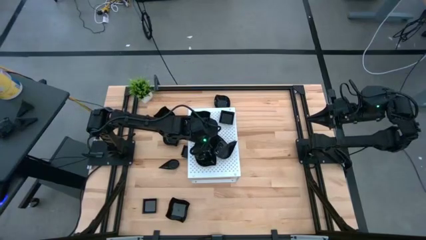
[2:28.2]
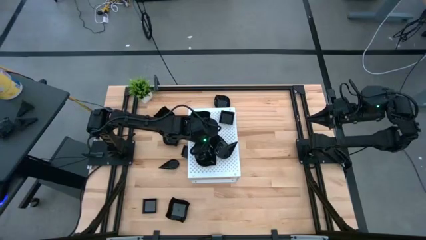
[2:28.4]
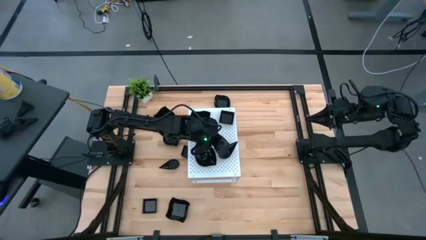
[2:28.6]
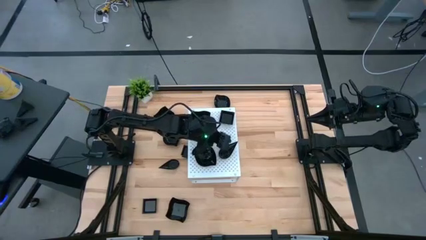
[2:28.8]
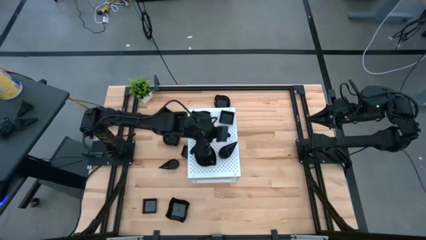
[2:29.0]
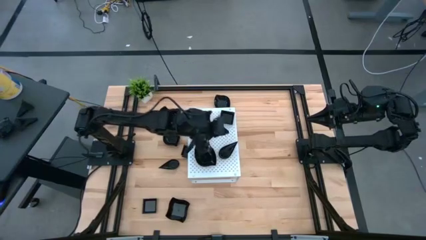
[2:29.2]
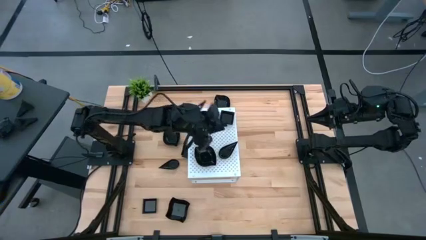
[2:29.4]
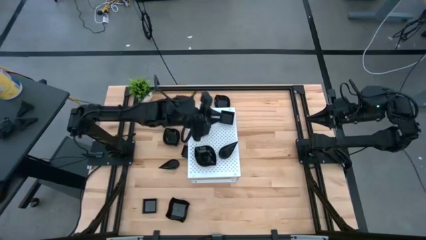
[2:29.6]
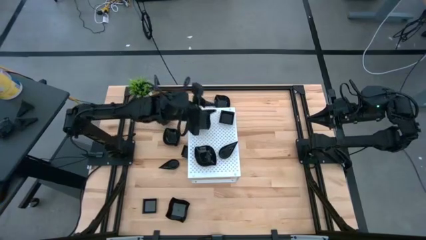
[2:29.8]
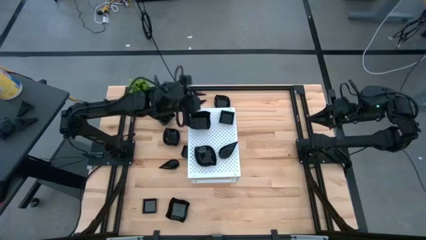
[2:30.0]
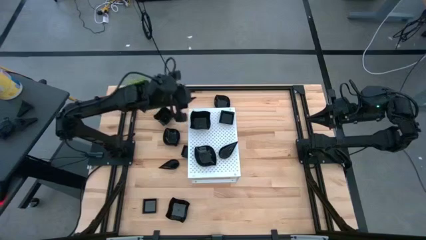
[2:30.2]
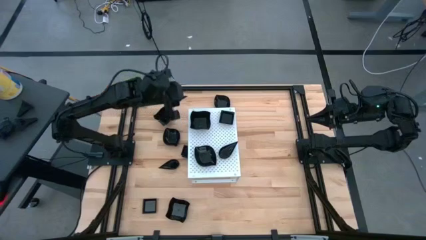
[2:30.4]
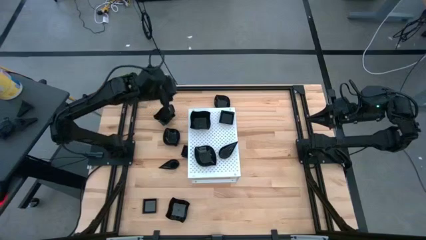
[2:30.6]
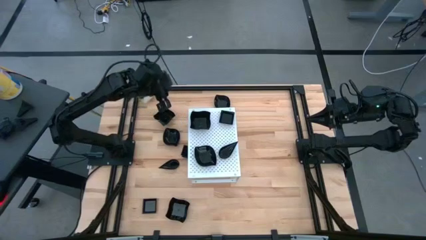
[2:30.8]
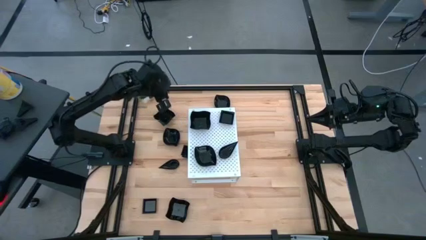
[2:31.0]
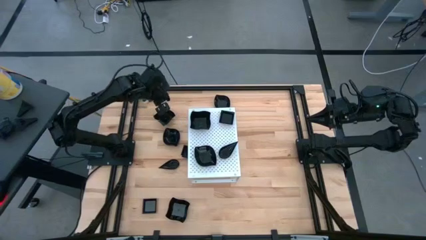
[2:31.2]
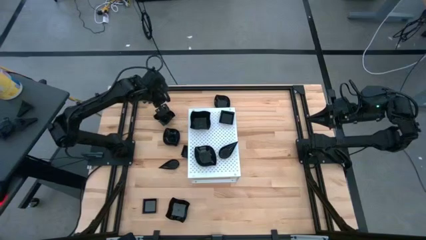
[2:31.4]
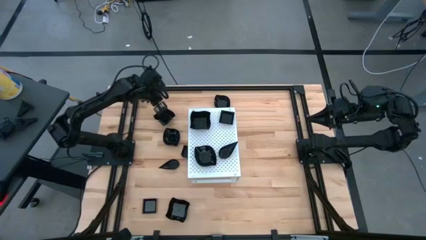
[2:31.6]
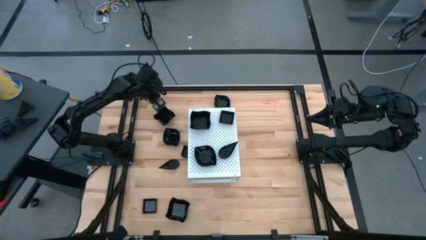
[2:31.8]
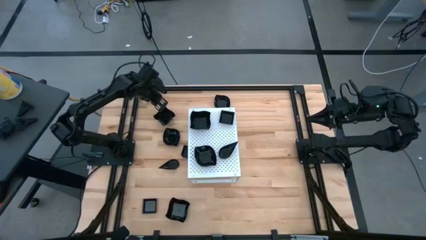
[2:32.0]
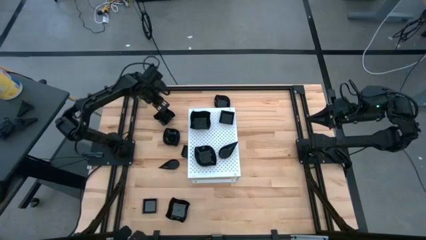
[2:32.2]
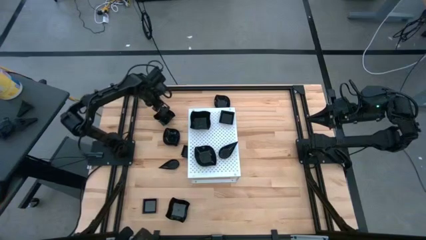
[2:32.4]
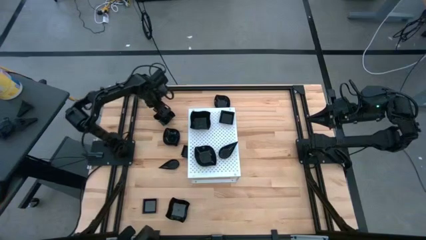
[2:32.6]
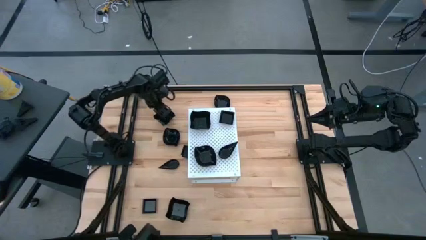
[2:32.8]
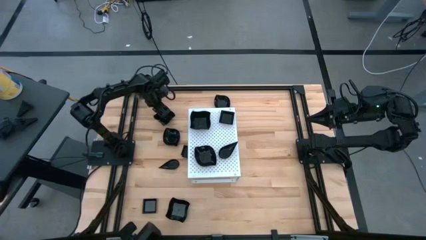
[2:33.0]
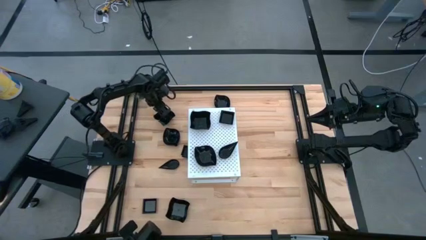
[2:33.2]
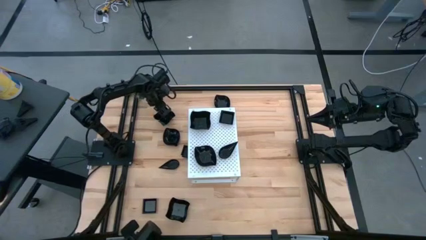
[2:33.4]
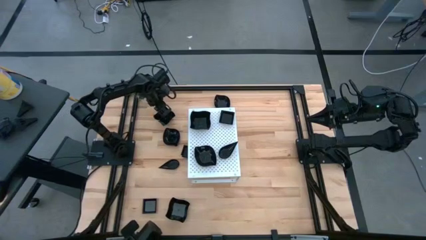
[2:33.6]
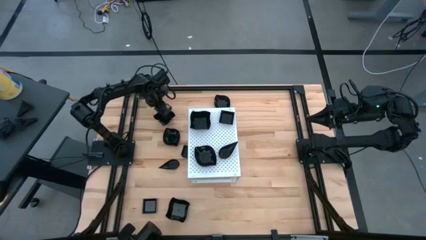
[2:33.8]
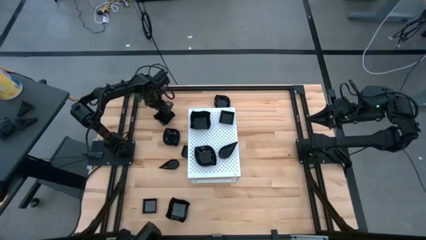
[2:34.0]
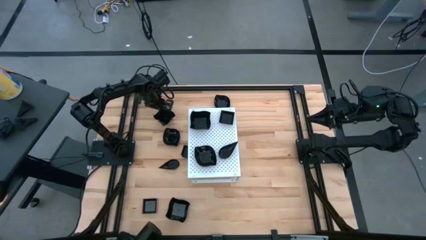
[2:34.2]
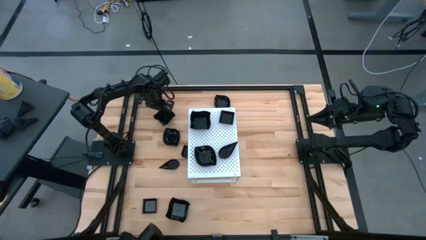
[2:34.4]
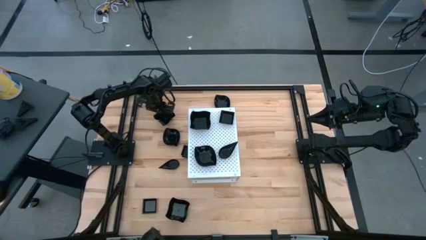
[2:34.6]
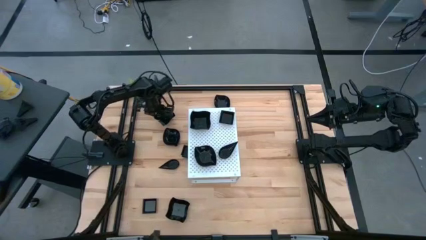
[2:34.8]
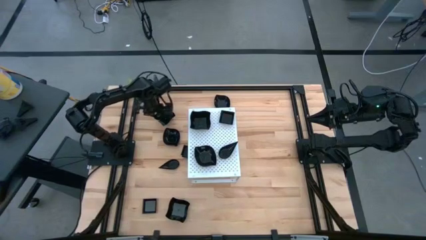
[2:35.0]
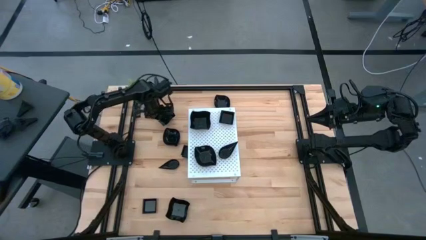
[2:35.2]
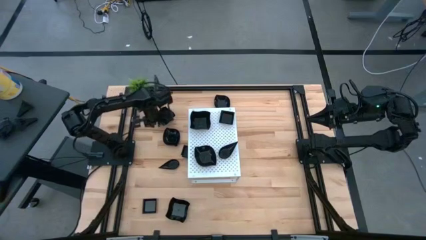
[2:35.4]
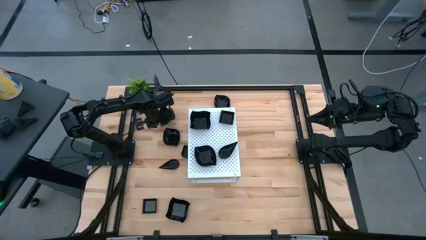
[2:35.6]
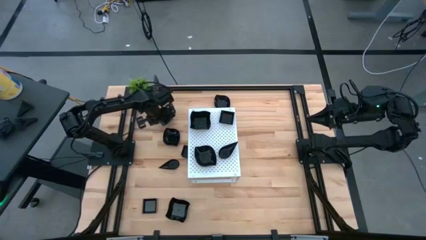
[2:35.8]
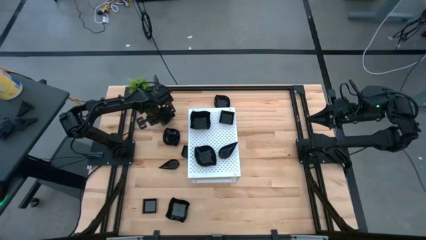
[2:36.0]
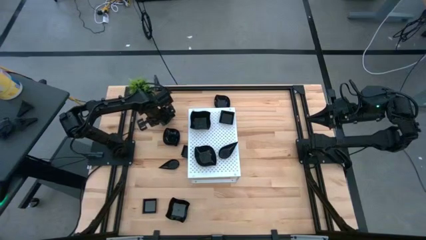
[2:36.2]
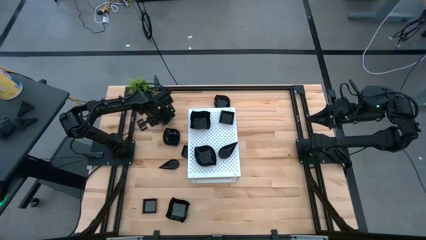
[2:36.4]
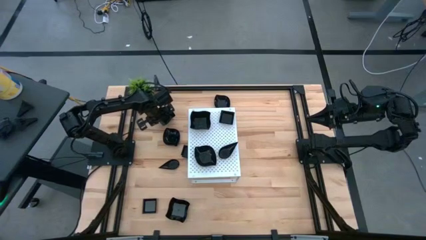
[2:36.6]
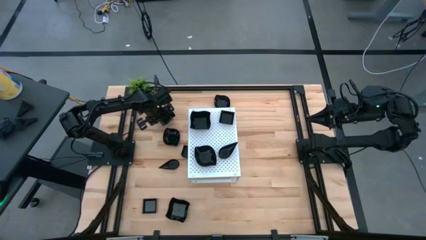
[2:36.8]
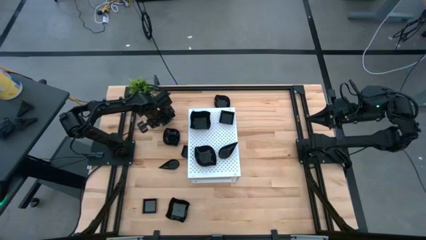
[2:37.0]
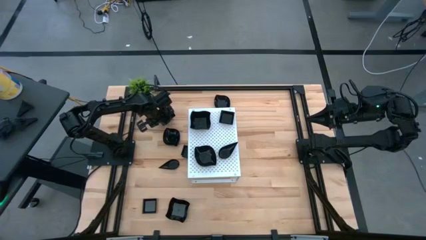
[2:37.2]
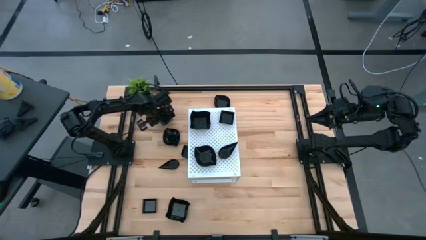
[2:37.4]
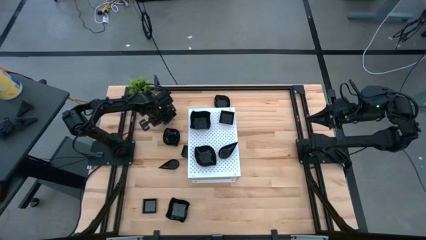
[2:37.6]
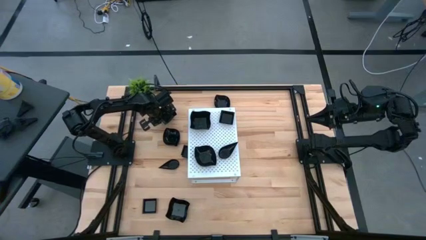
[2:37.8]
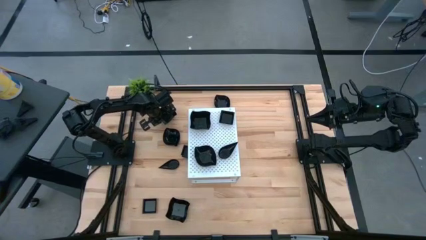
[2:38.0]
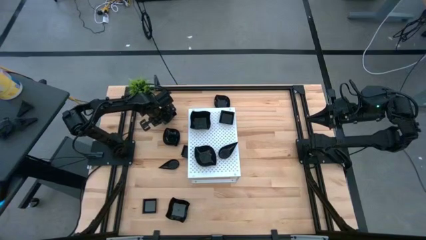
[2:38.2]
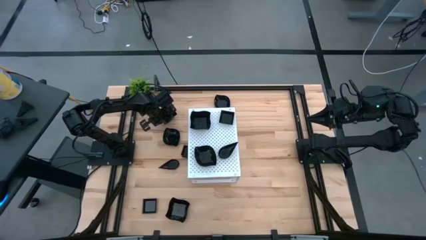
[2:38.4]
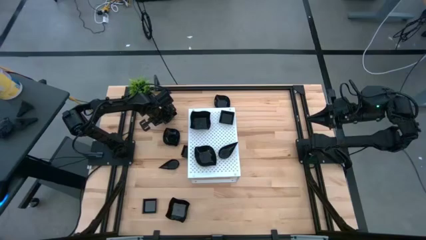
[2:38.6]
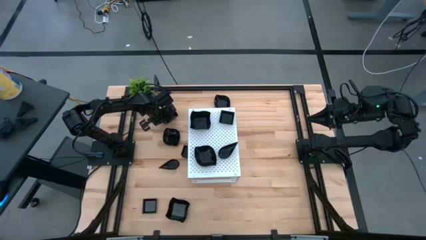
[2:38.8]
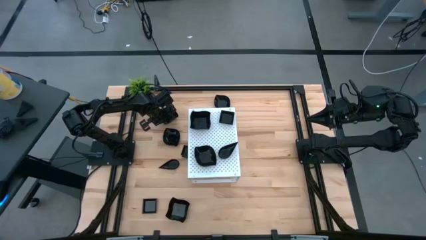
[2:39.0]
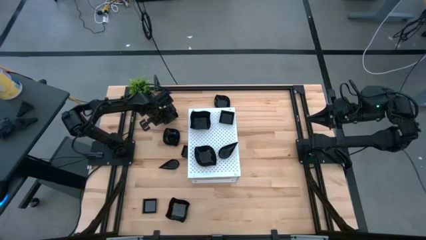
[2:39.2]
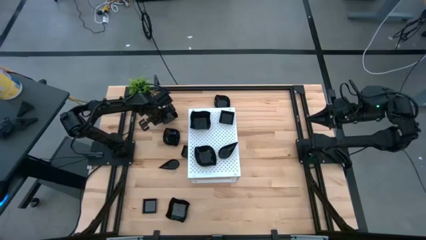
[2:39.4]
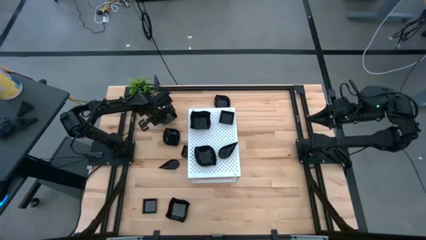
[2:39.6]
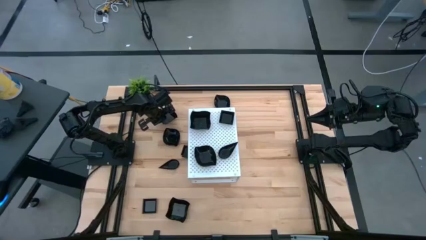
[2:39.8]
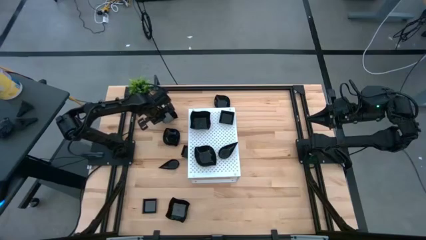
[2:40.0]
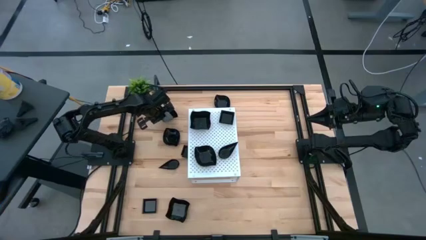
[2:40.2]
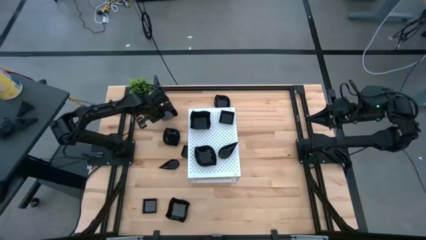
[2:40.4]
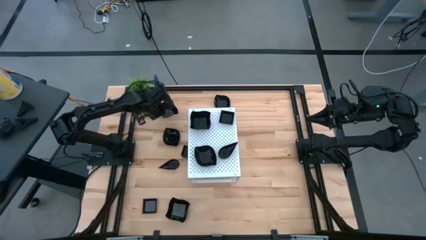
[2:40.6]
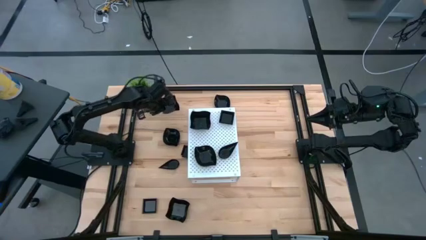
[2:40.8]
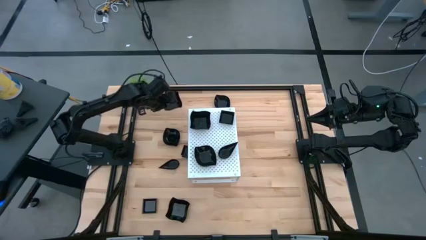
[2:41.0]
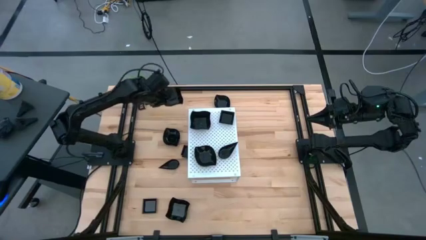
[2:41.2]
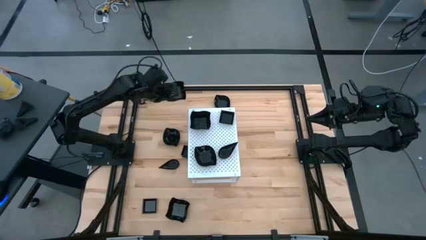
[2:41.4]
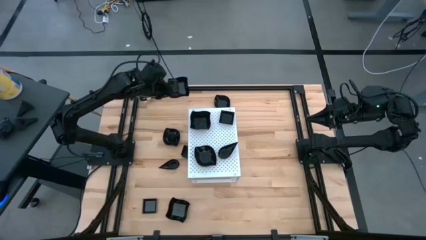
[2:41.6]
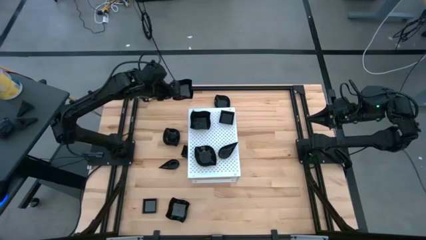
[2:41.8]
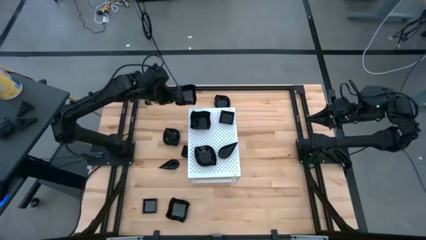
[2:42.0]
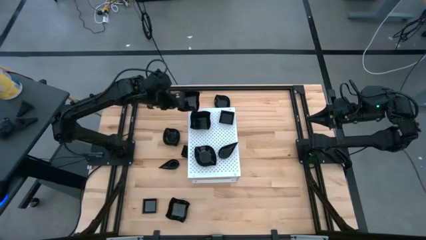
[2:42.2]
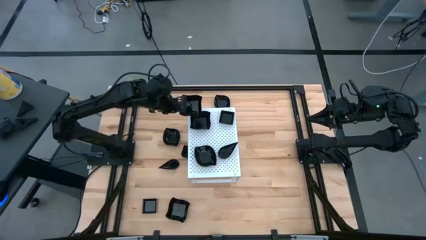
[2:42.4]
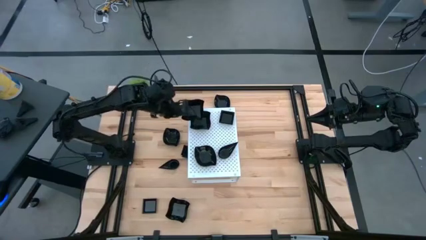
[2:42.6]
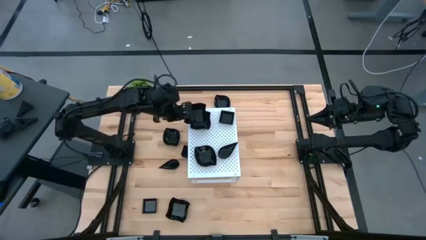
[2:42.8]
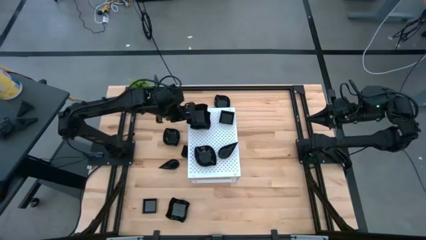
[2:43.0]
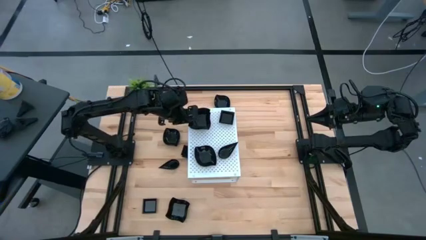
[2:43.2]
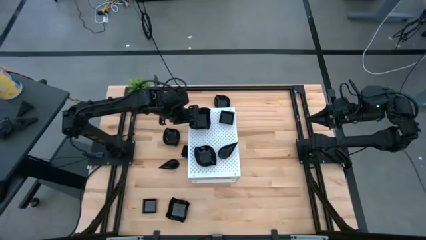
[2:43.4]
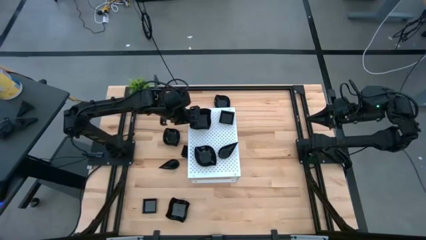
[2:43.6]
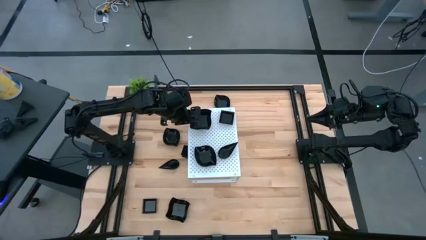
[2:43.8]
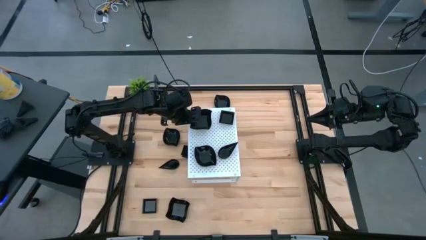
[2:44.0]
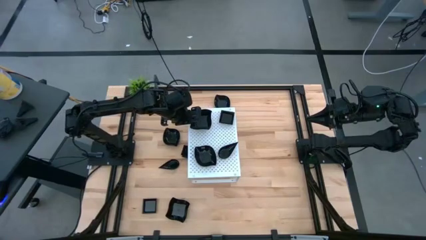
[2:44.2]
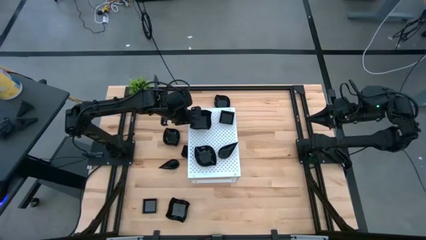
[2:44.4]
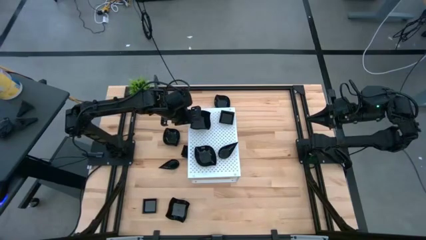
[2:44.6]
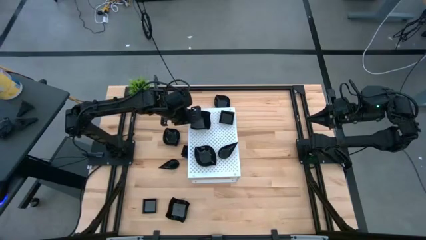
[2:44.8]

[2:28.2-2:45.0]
Task: Pick & Place Mini shaped plates
Stack the black distorted square plate on top of the other black distorted square plate on the shelf
